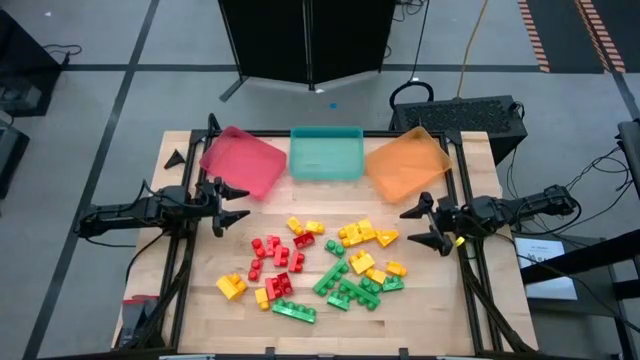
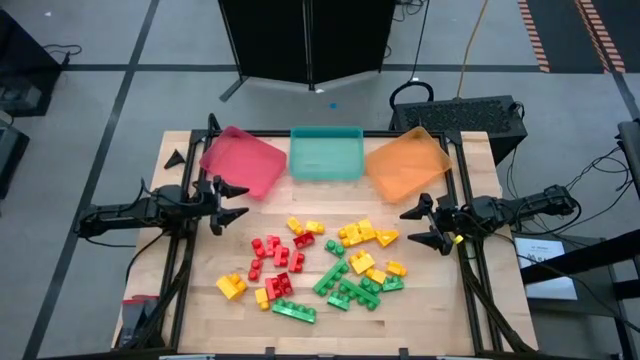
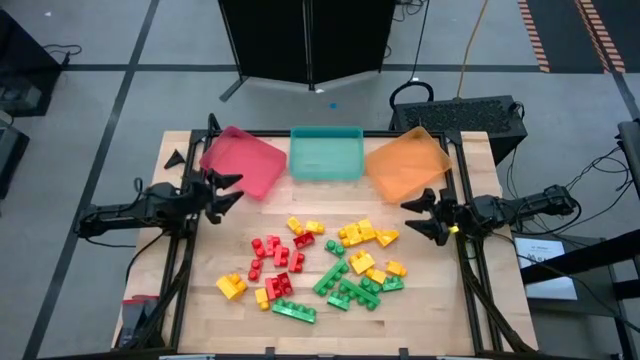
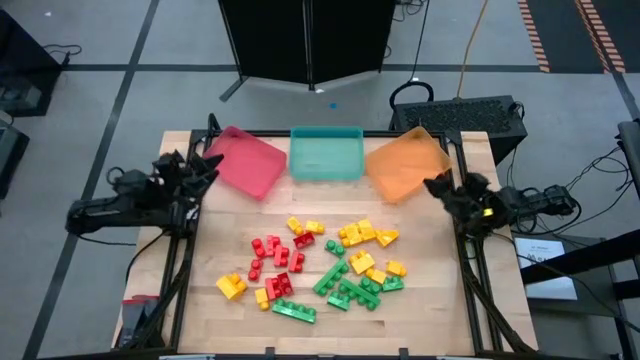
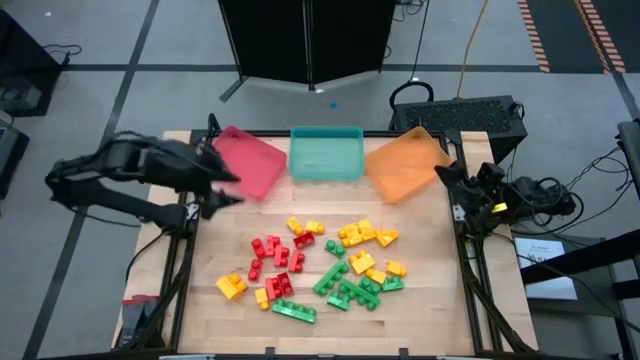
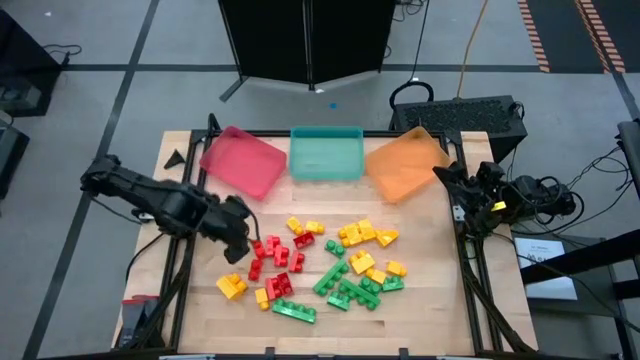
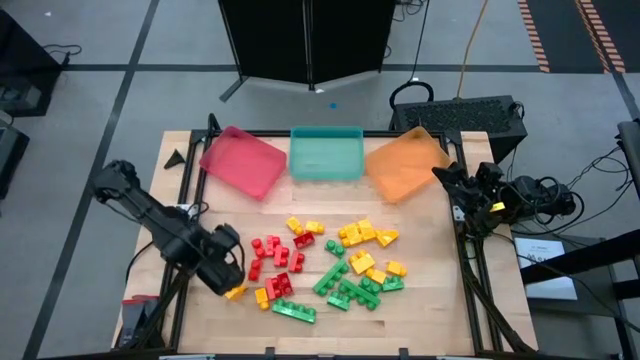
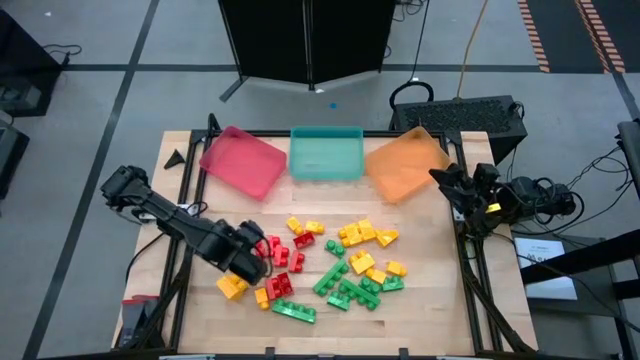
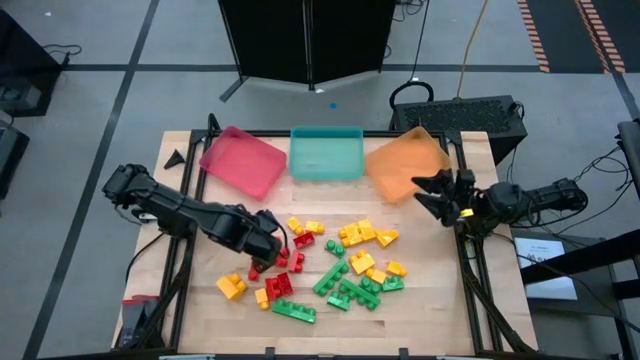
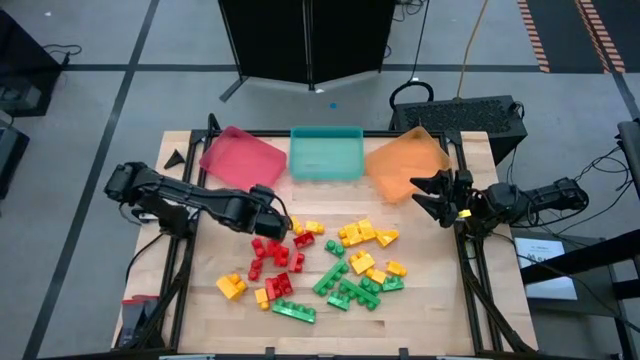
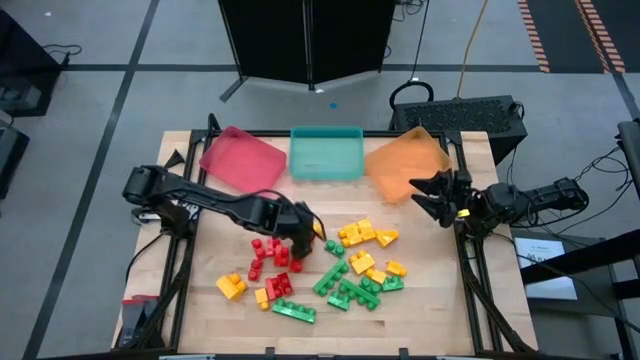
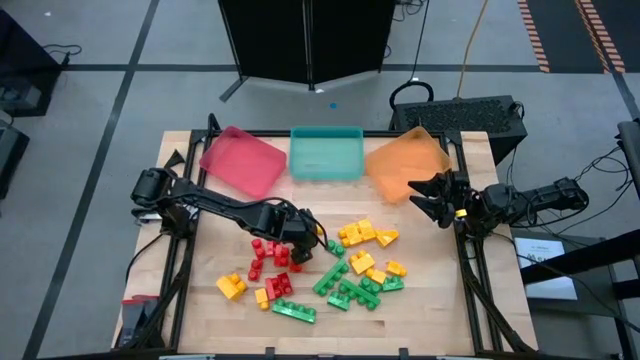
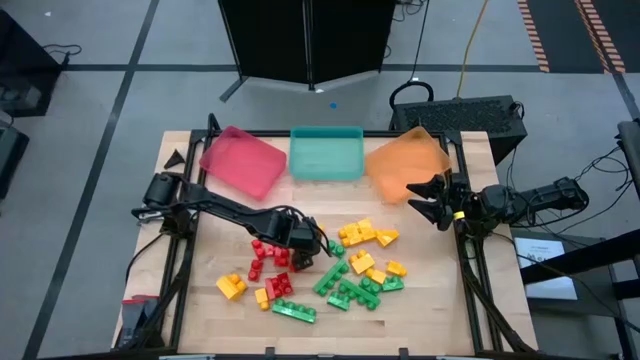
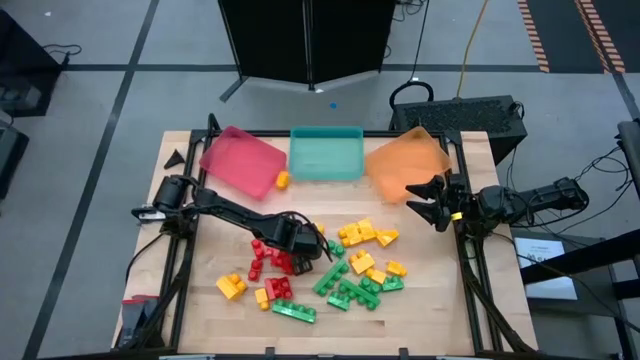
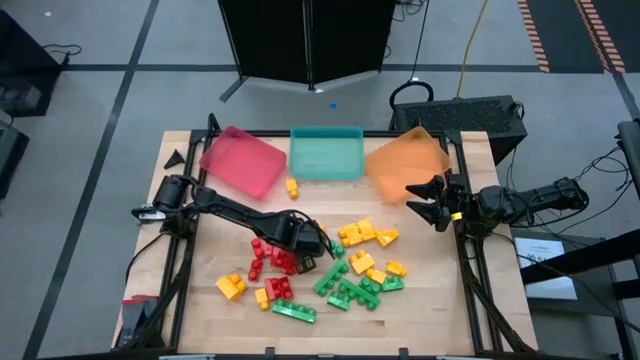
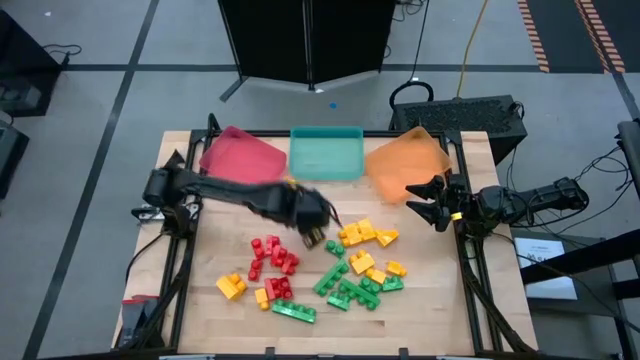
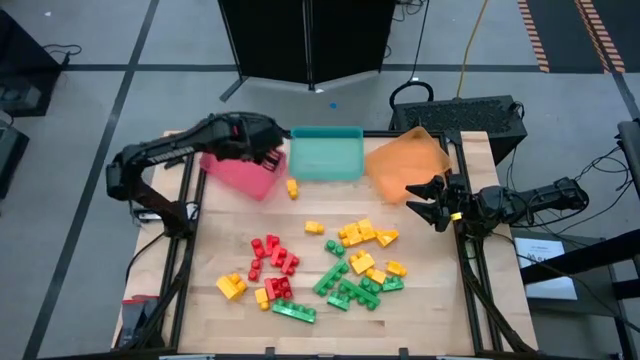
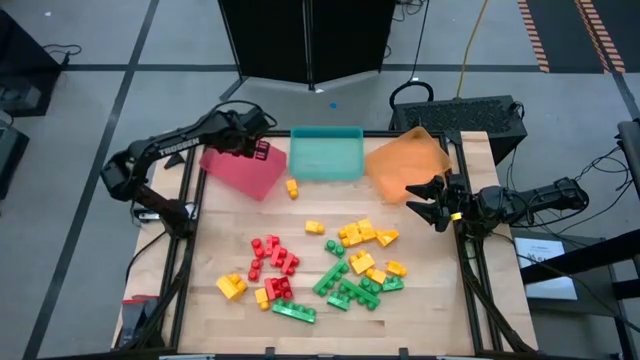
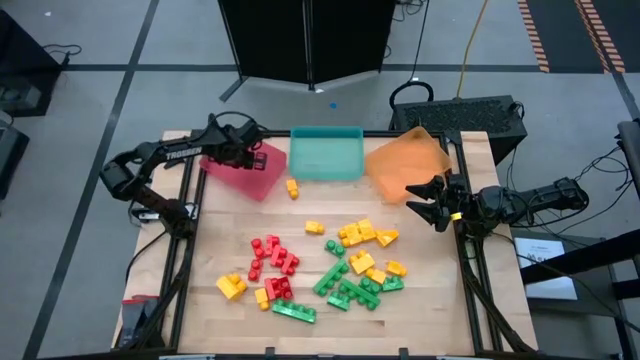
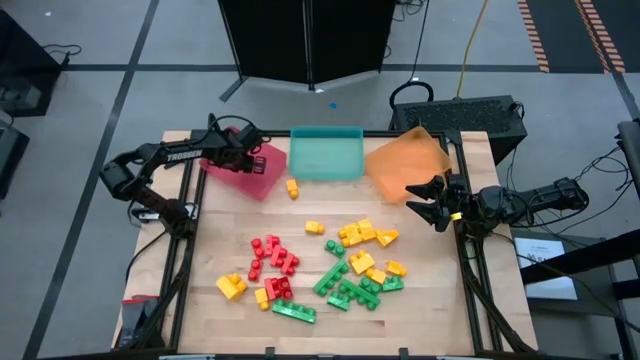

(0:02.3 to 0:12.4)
Task: Sort blocks
Put the red game piece into the red bin

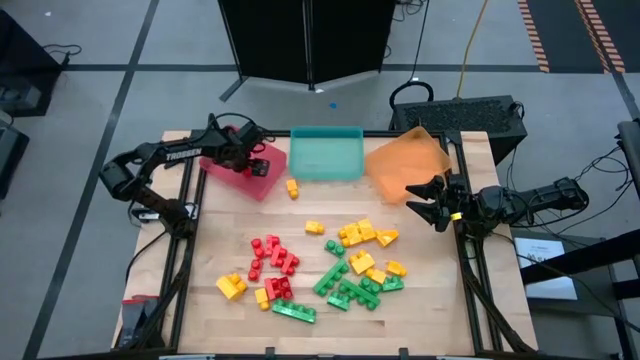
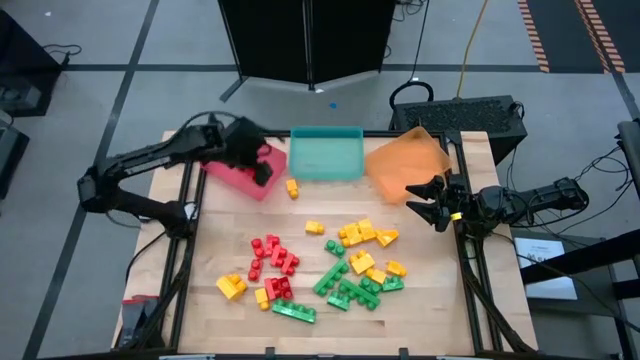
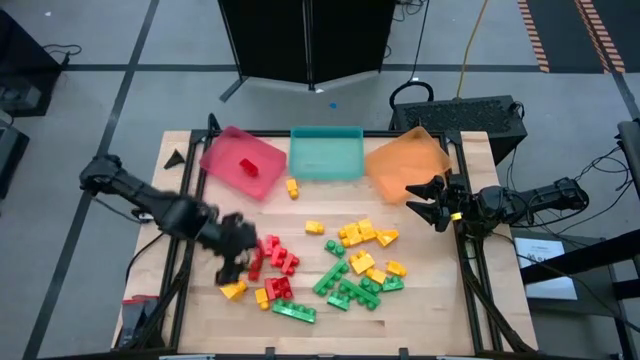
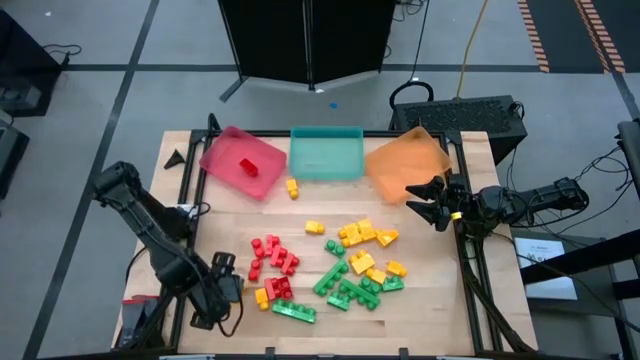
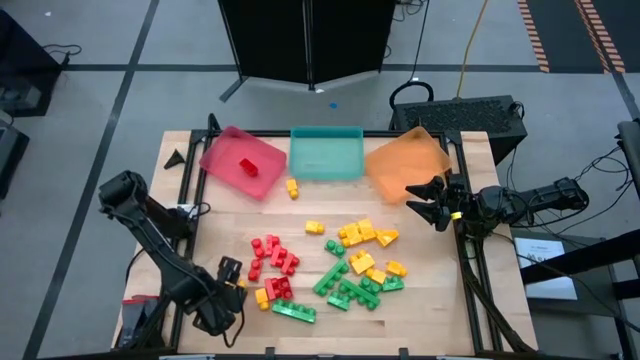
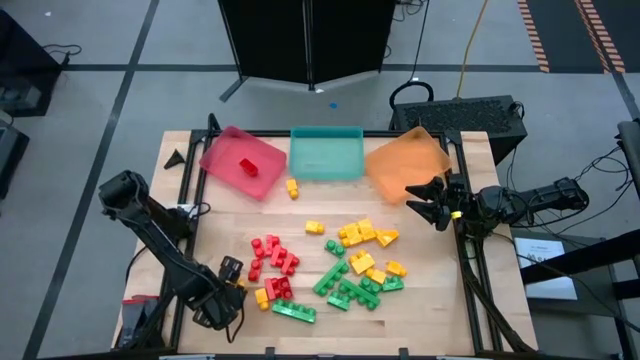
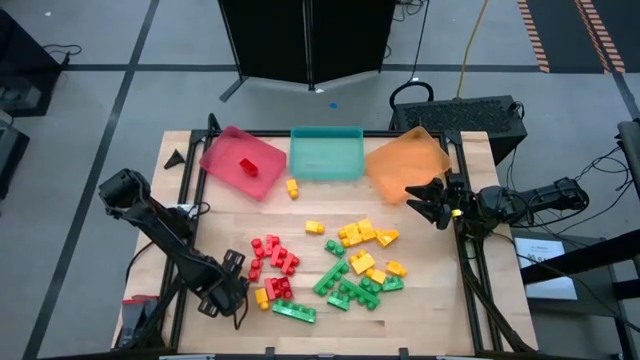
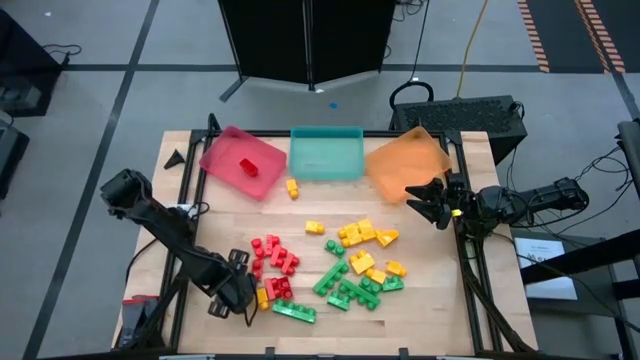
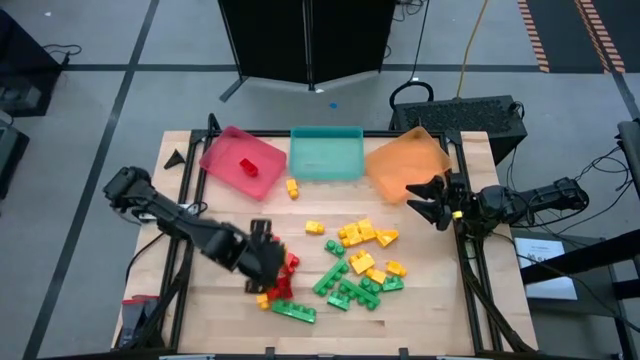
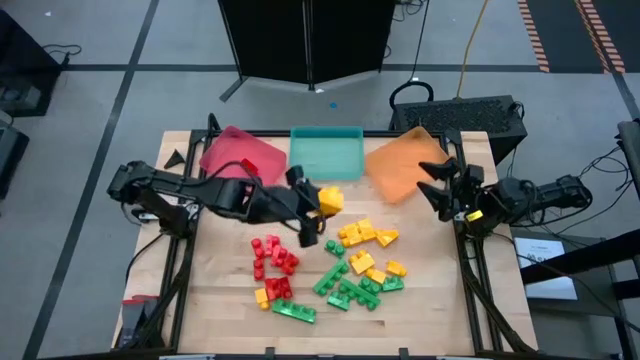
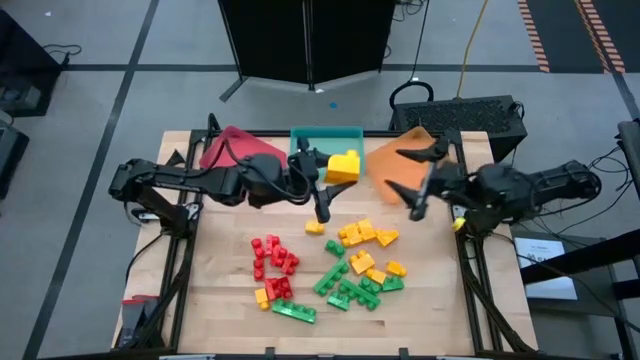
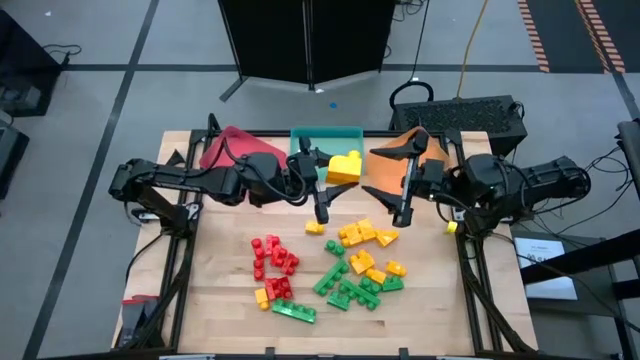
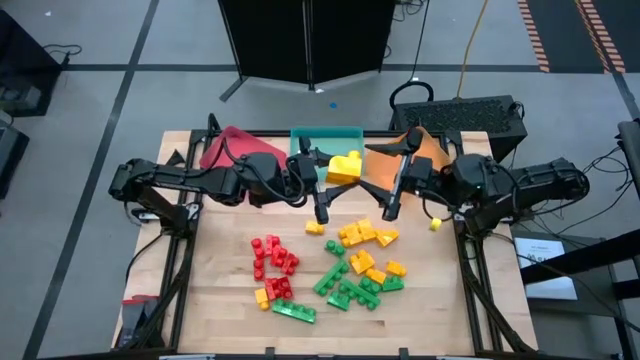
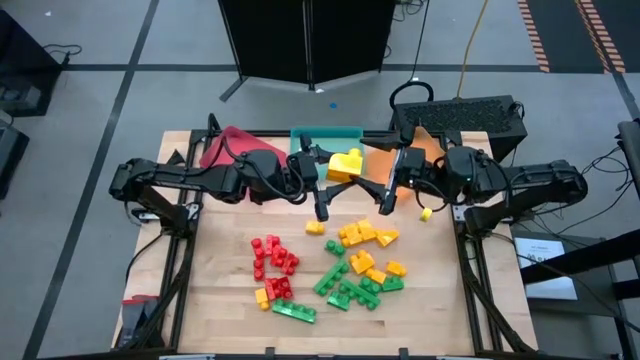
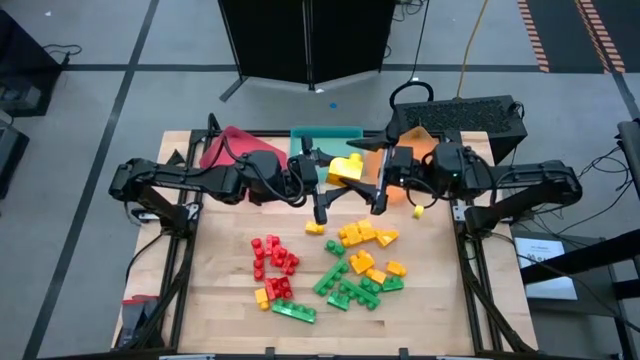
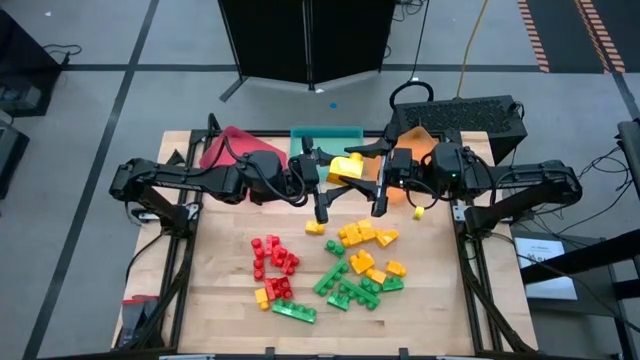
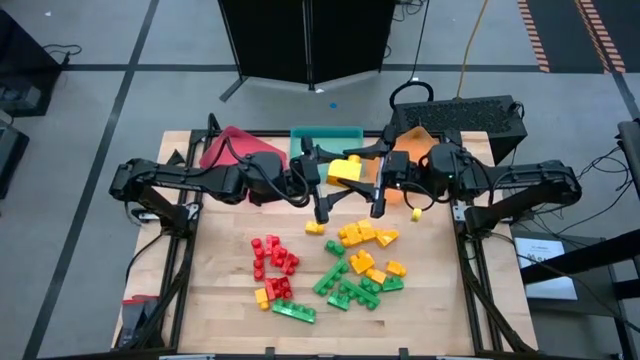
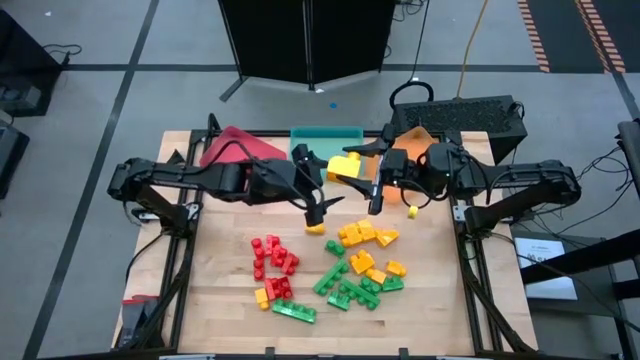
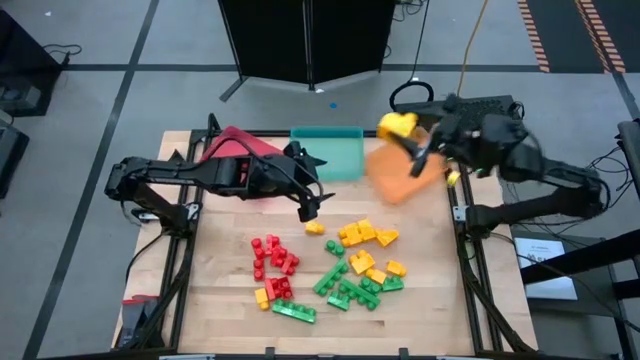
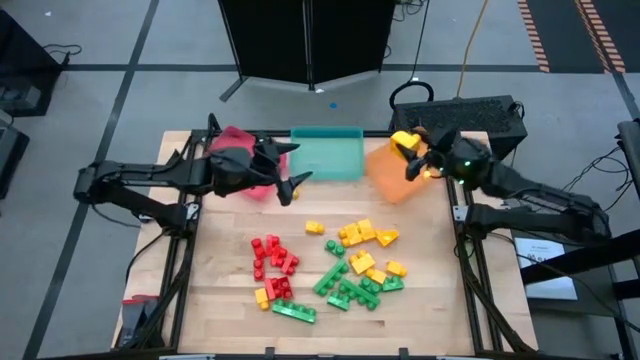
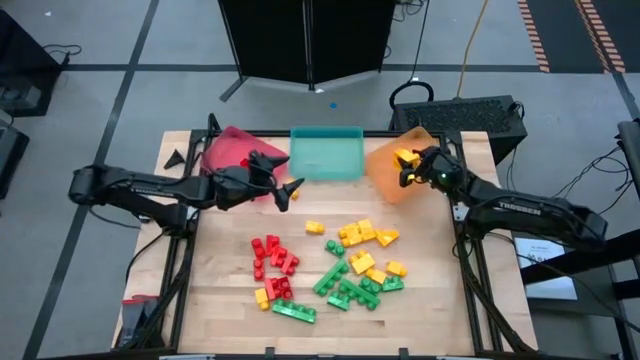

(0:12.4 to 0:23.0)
Put the yellow game piece into the orange bin
